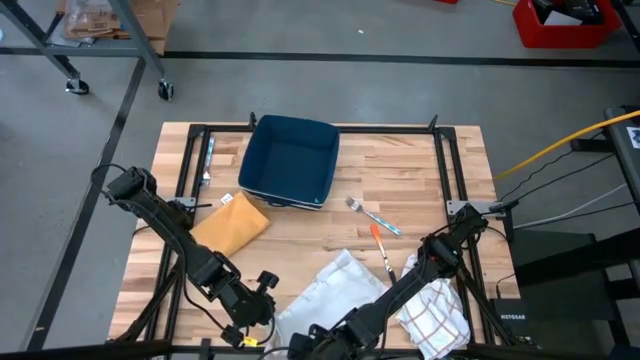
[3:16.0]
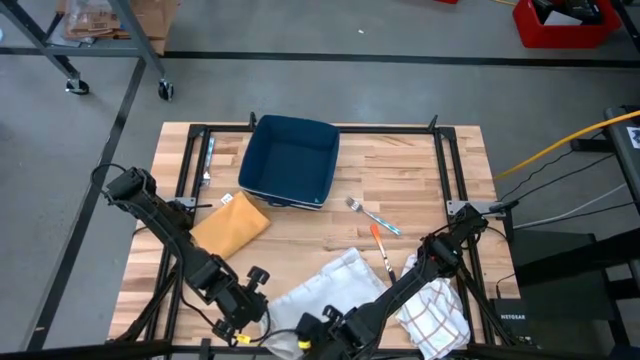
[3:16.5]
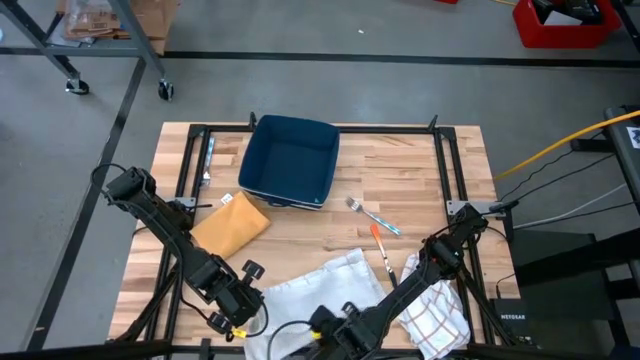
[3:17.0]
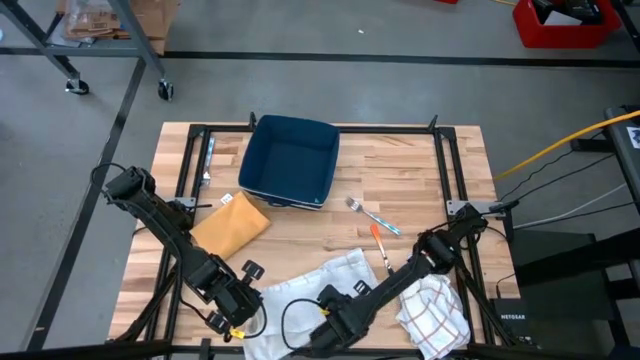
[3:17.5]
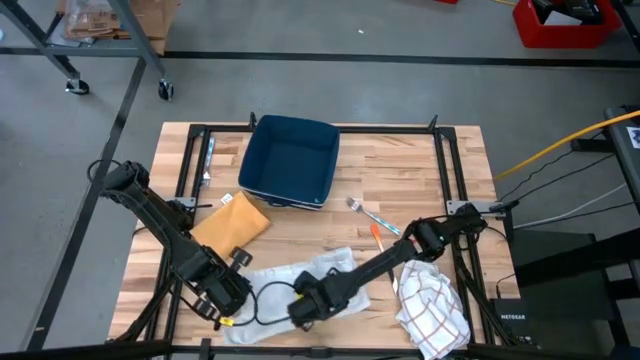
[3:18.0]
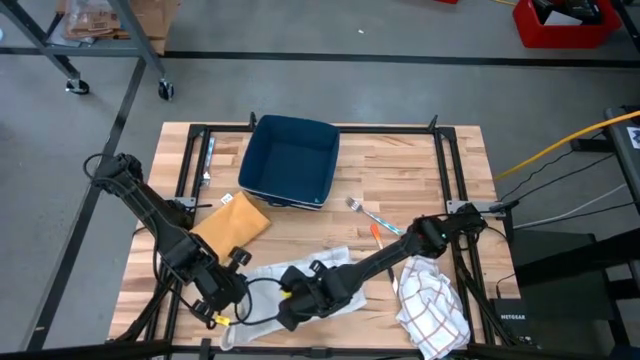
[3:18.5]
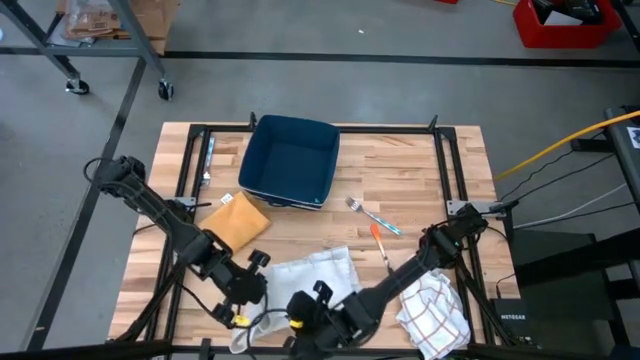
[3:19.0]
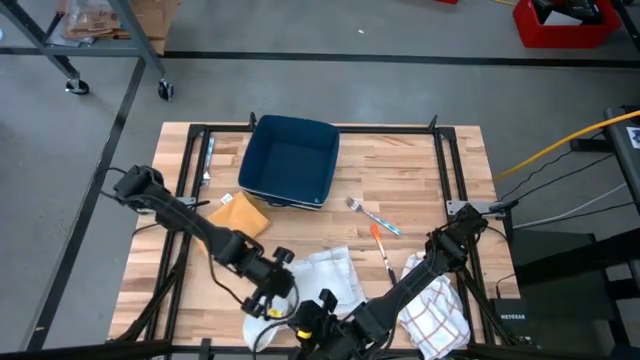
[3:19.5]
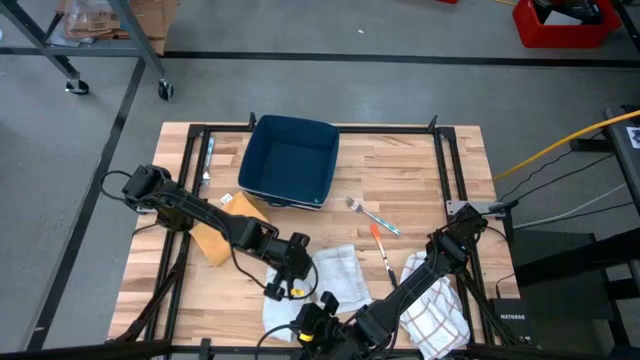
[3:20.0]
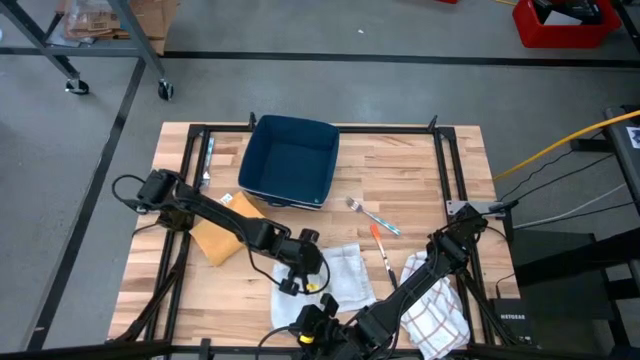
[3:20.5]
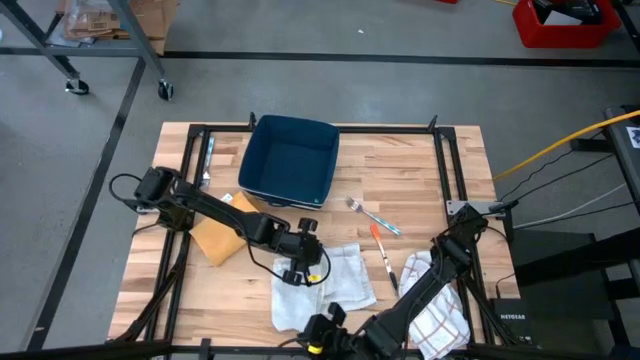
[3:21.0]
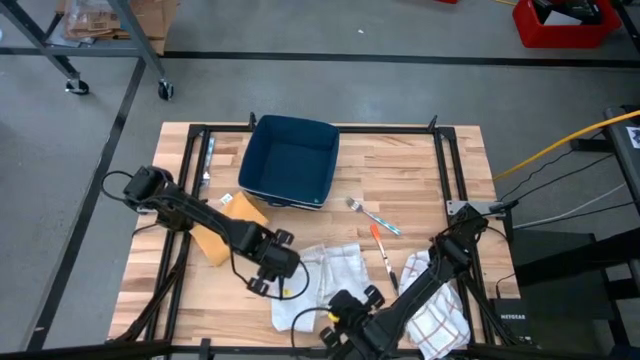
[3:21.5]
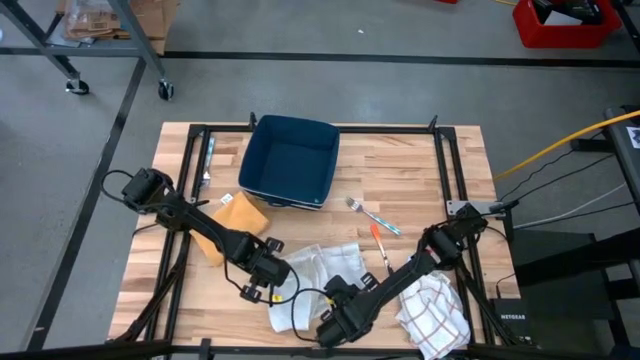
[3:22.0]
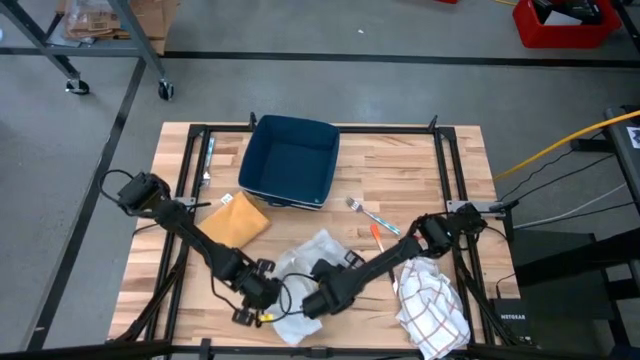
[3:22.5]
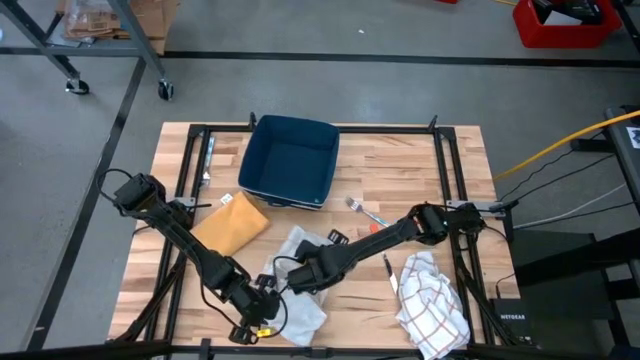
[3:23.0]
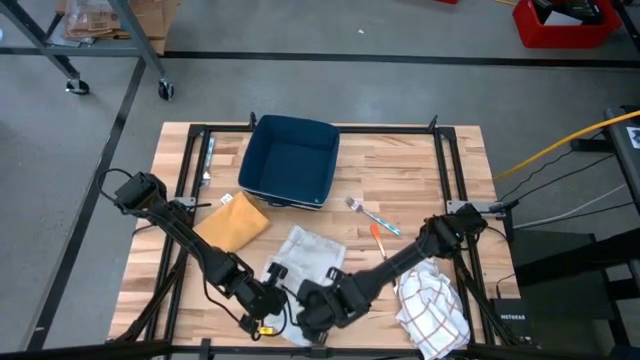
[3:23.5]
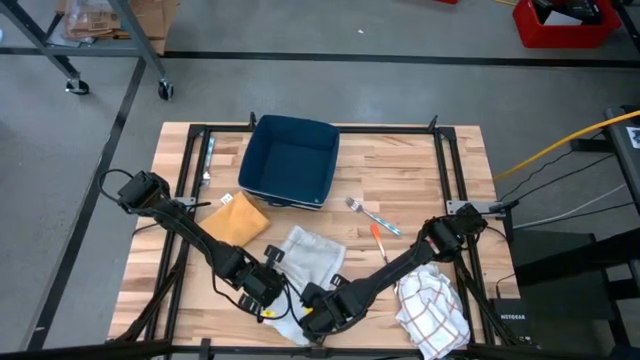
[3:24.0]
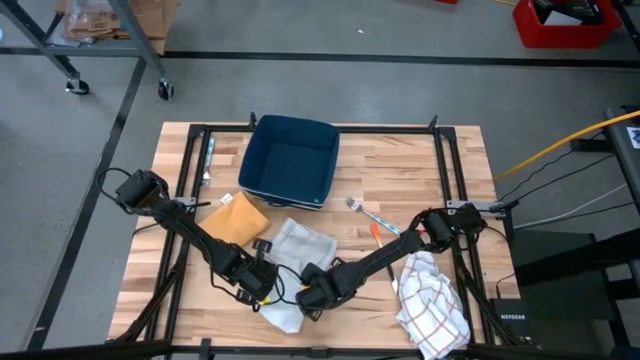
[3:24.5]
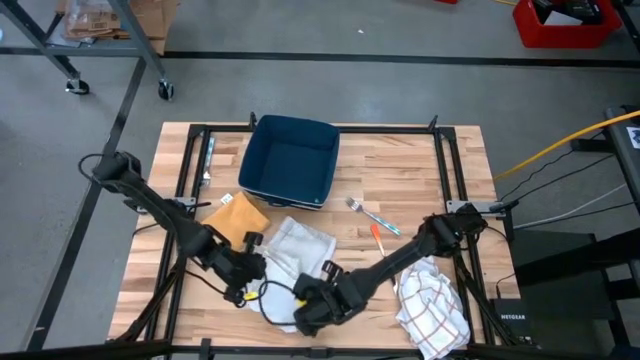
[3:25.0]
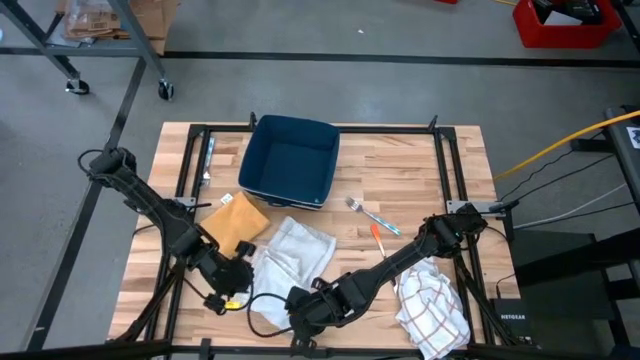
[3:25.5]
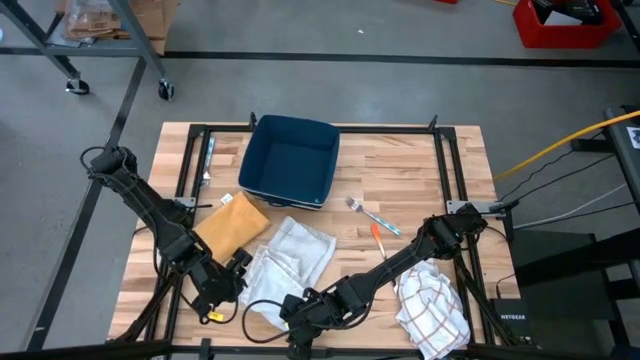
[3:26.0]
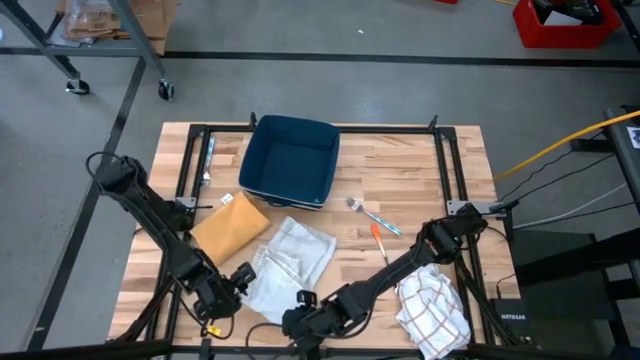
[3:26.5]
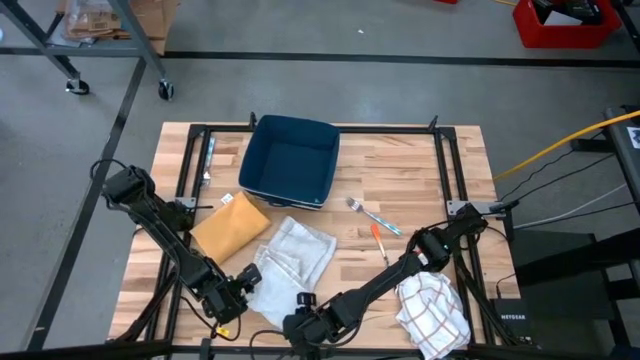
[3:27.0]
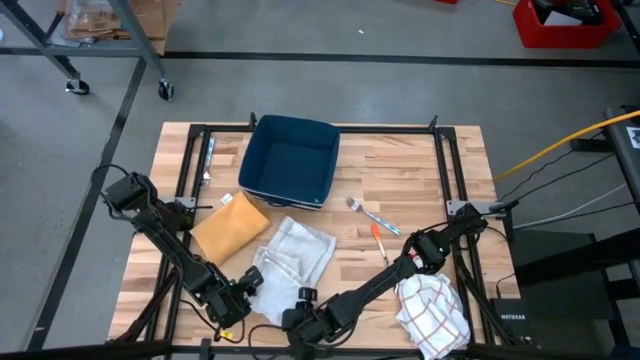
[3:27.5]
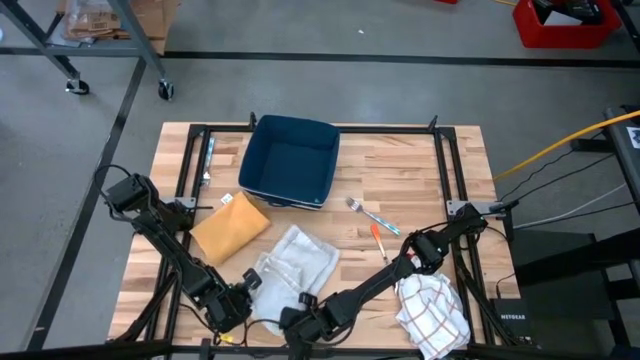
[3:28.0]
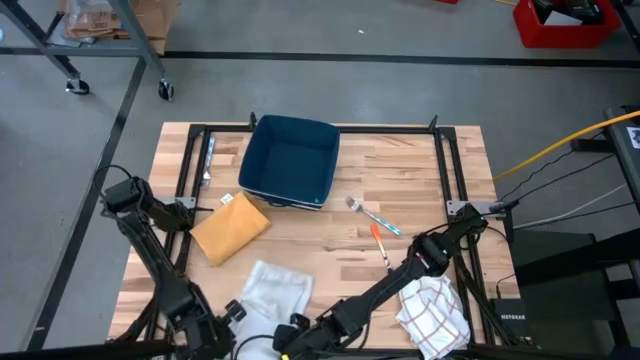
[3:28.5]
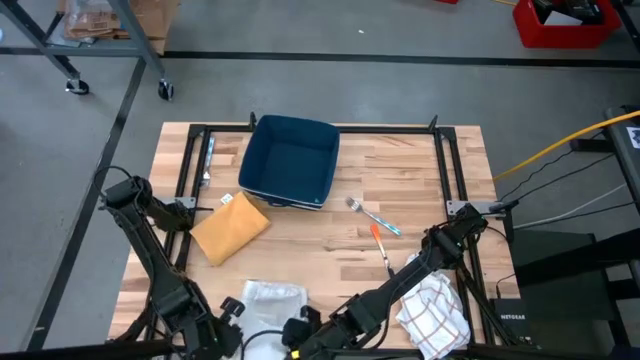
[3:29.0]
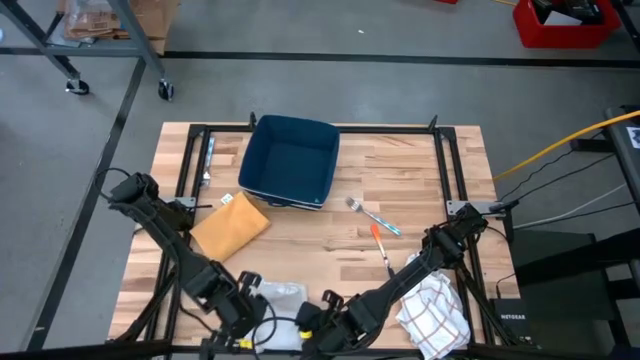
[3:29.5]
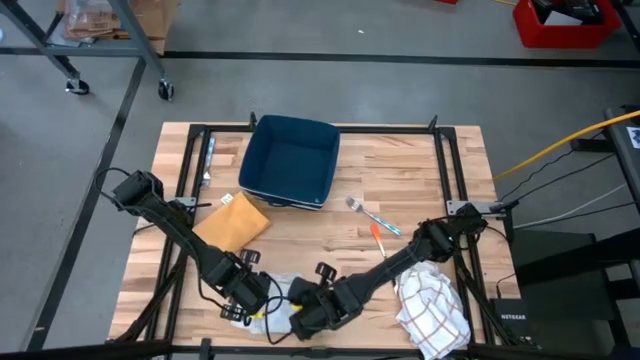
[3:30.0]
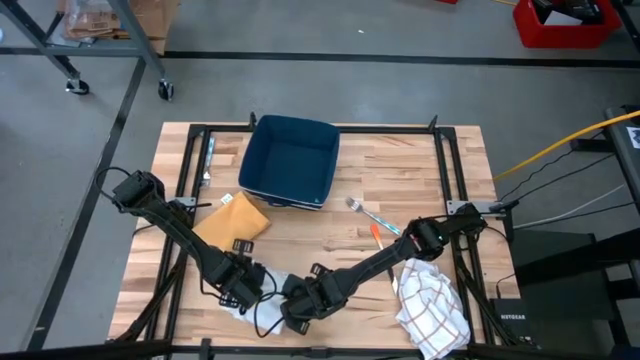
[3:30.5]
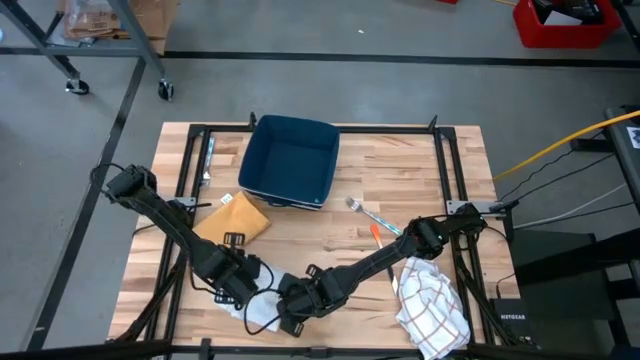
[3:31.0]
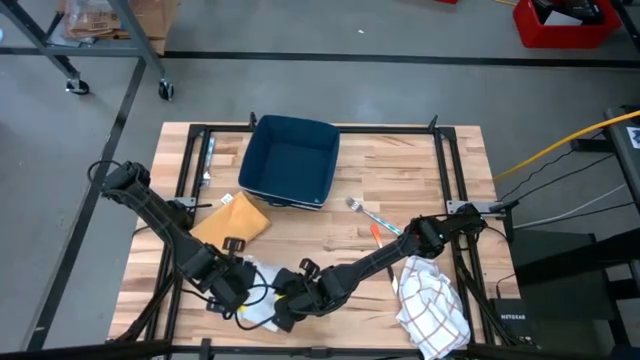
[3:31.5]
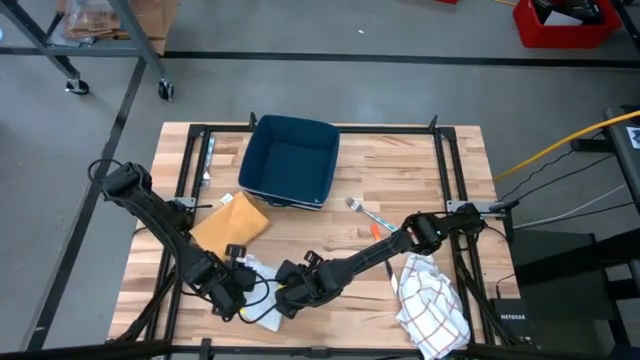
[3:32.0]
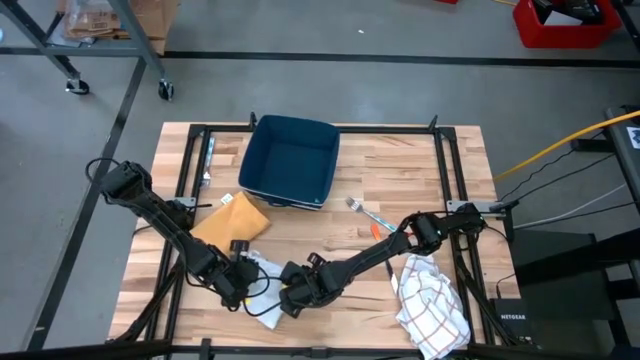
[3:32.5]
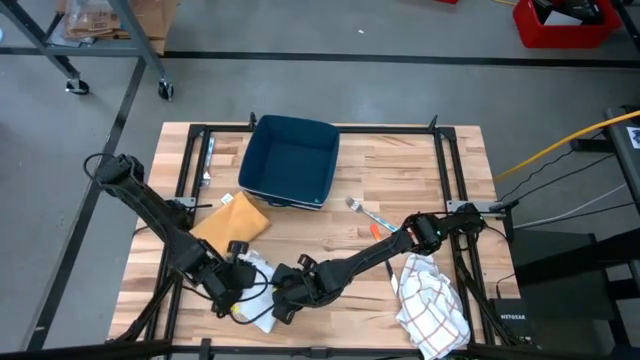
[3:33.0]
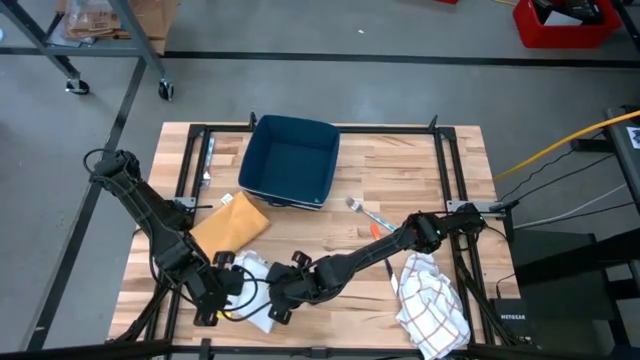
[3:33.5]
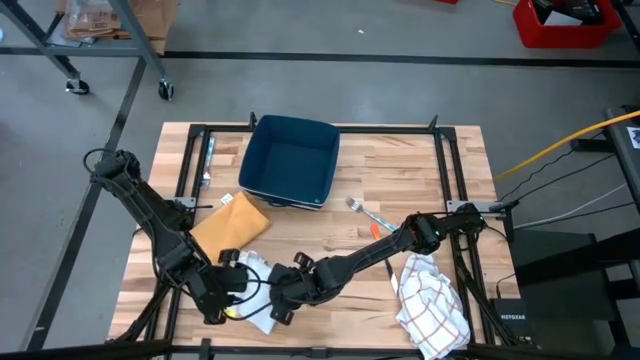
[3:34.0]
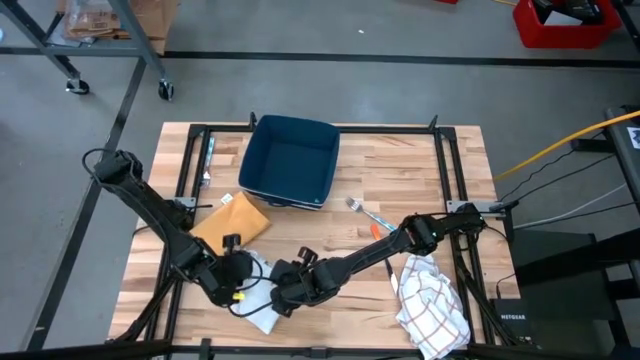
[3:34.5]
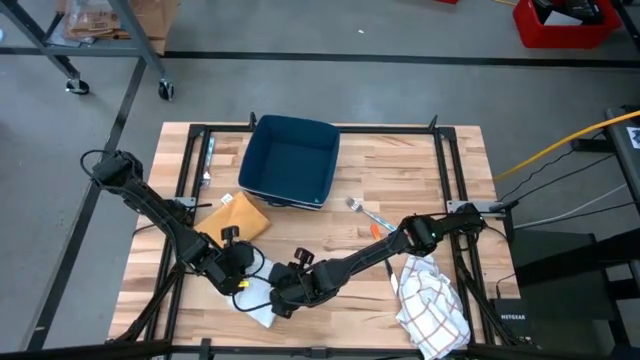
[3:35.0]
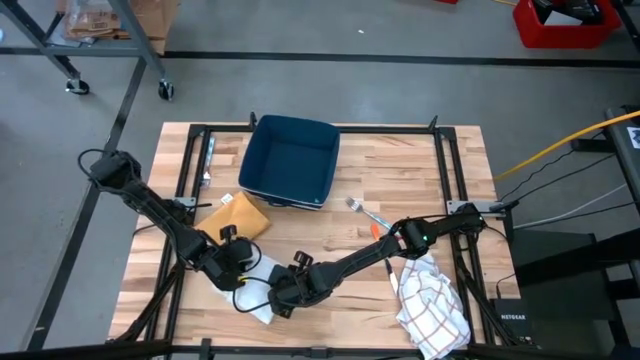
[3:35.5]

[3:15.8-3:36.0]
Task: Fold towel
Fold the top white patterned towel

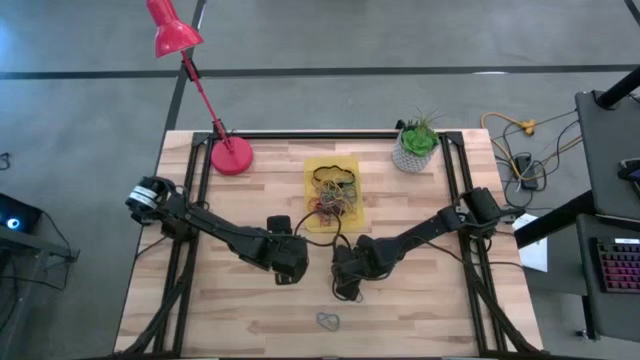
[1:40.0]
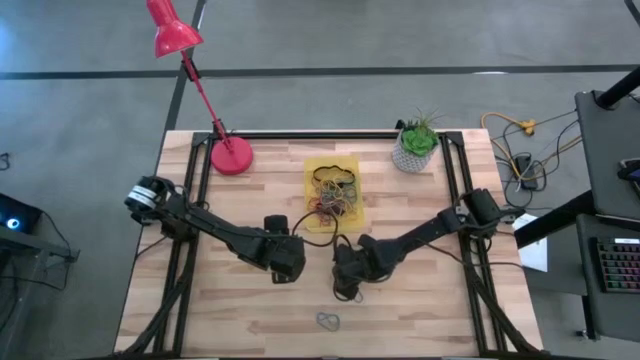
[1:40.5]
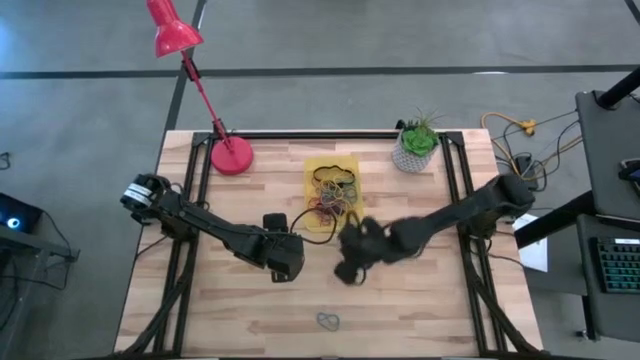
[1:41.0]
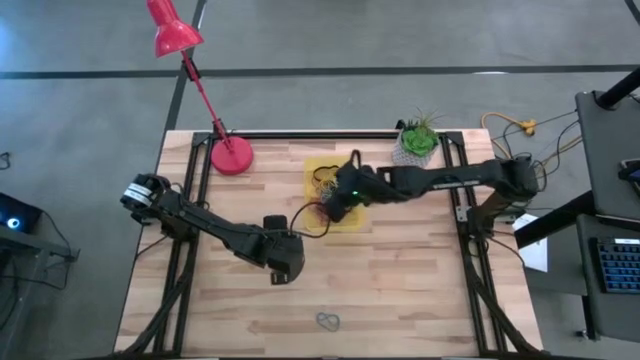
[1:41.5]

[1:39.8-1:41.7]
Task: Pick and place rubber bands into bin
Put the blue rubber band into the yellow bin
